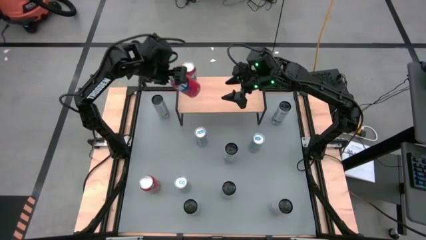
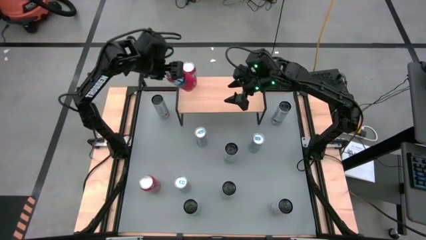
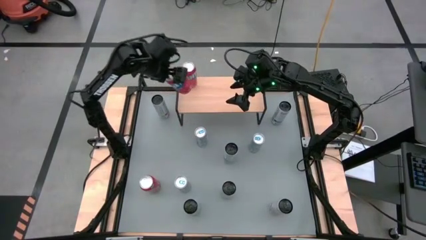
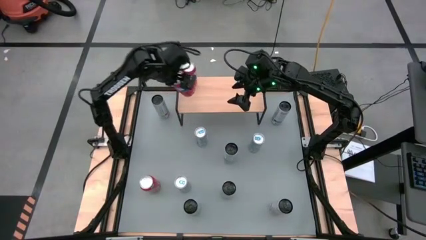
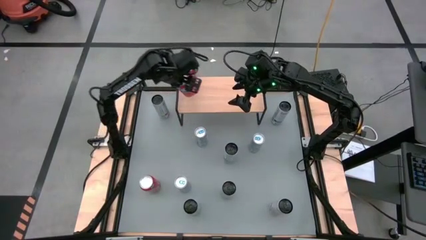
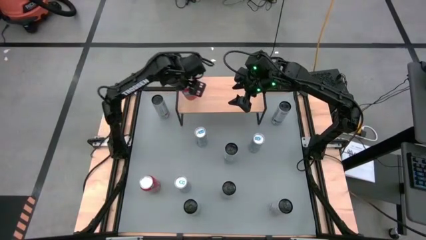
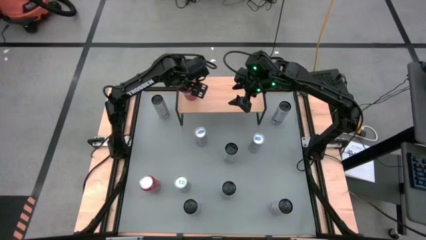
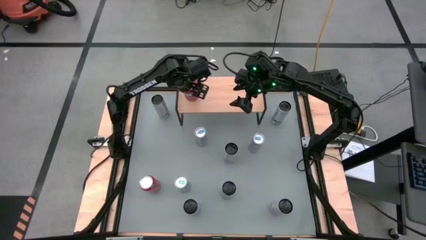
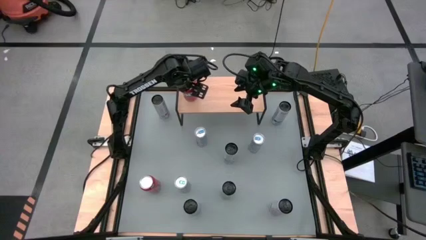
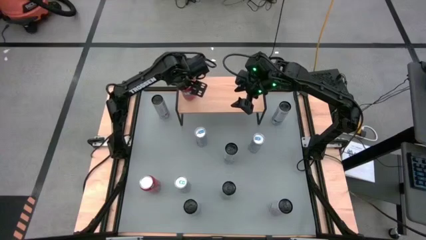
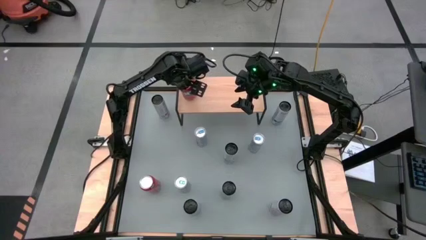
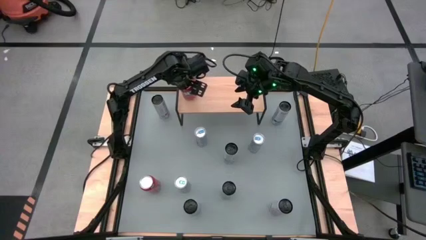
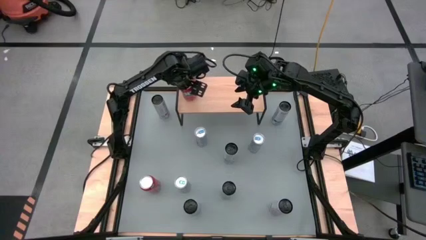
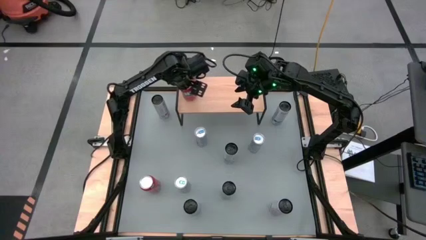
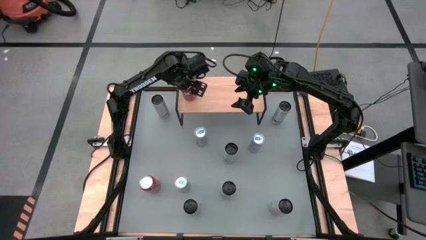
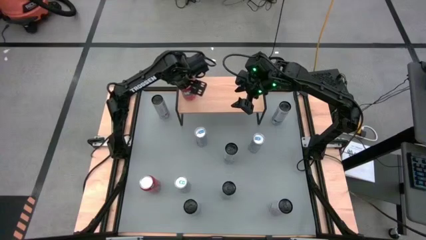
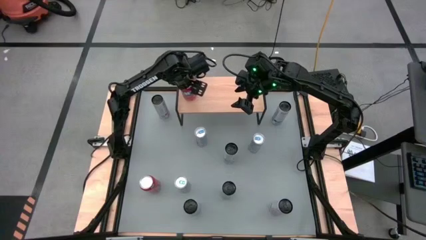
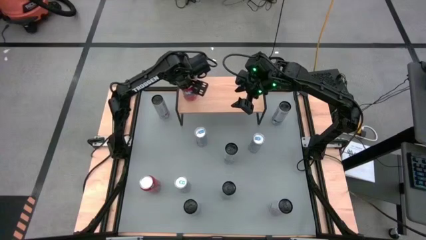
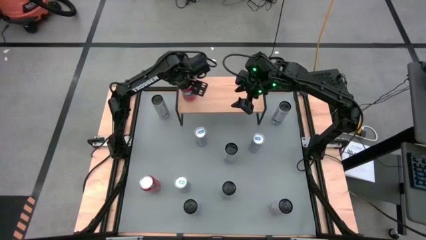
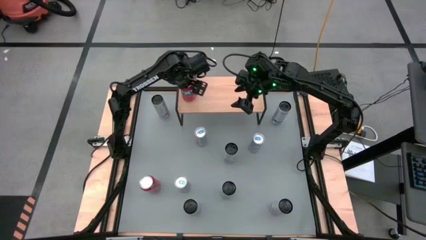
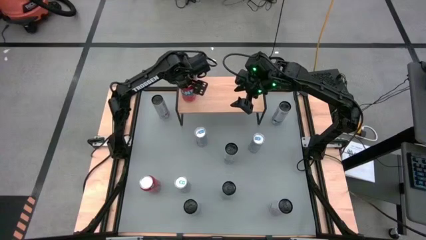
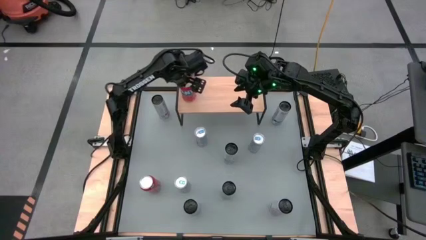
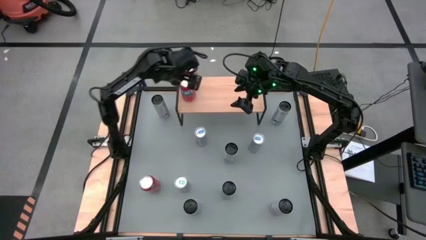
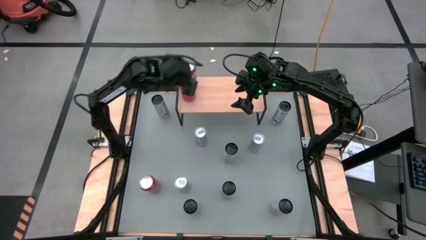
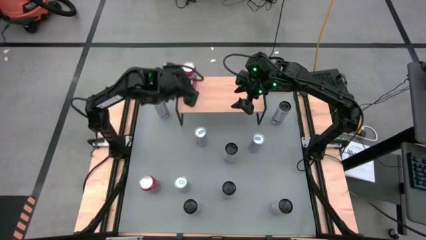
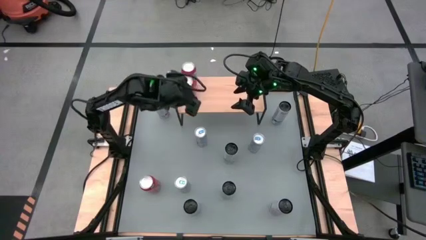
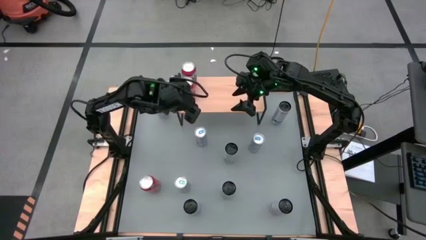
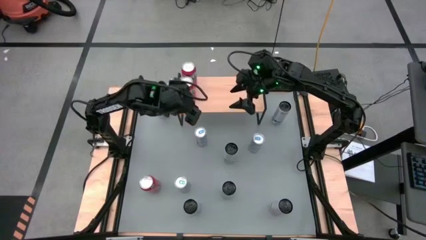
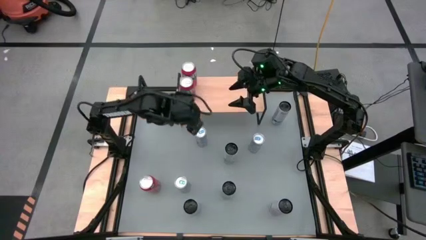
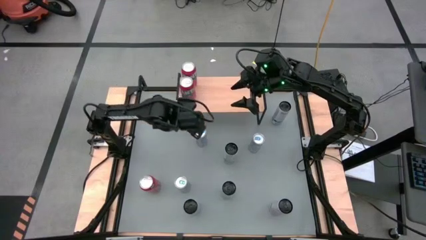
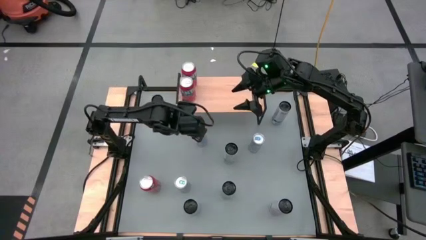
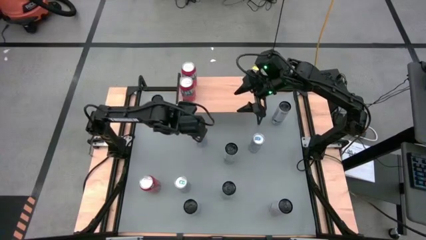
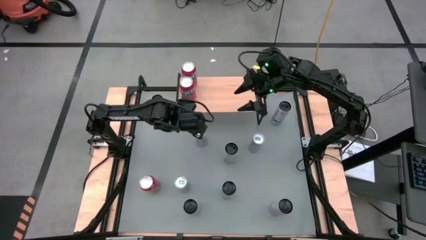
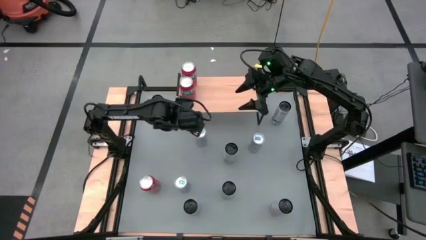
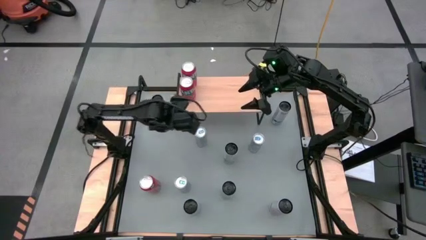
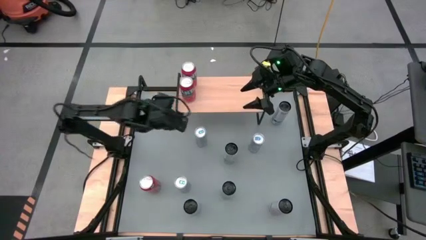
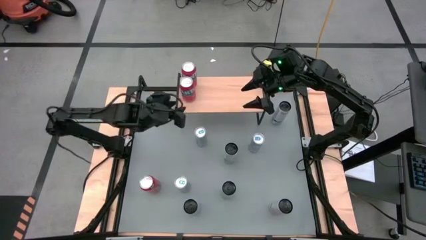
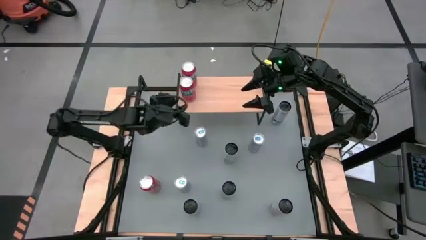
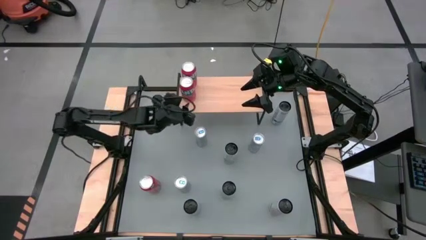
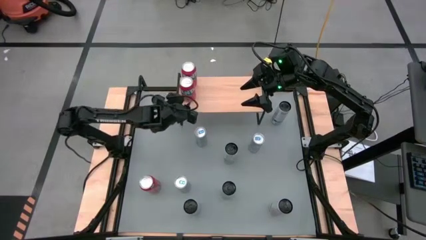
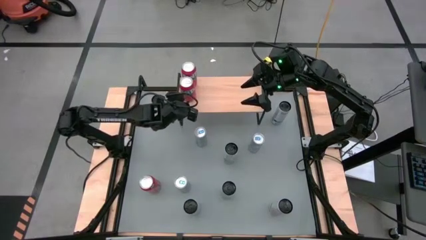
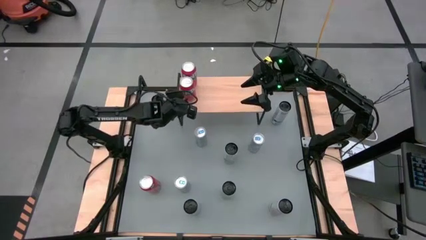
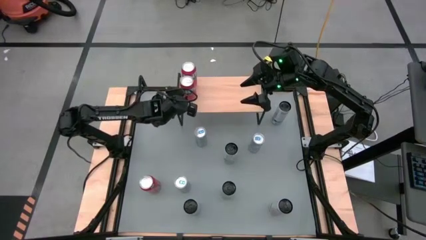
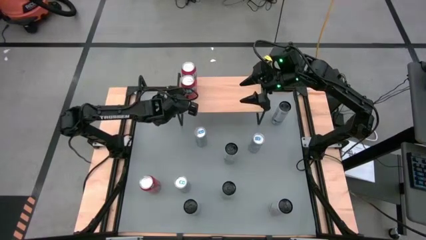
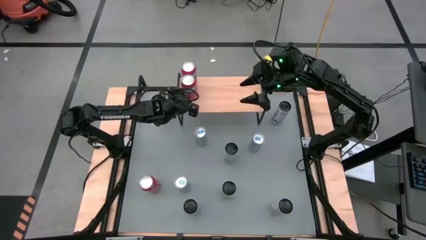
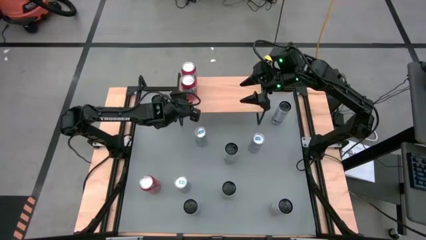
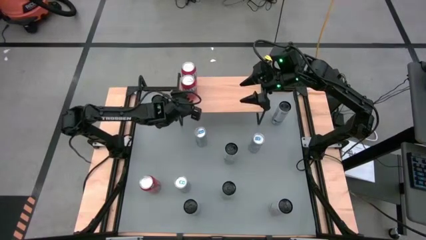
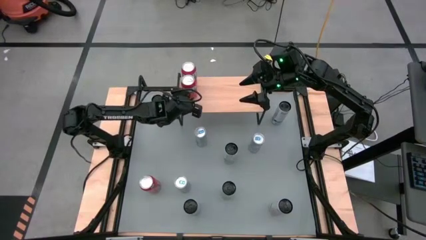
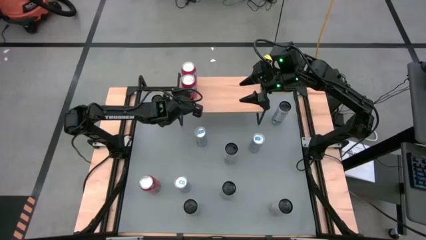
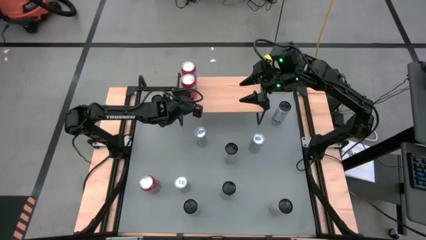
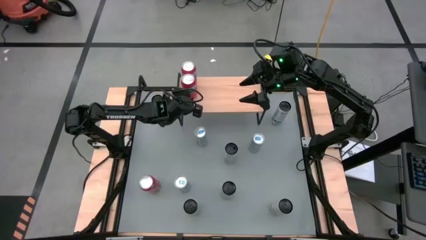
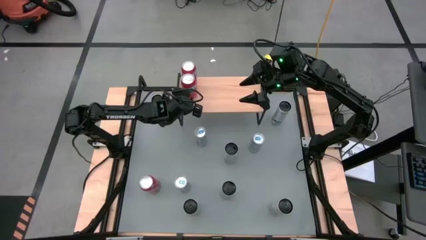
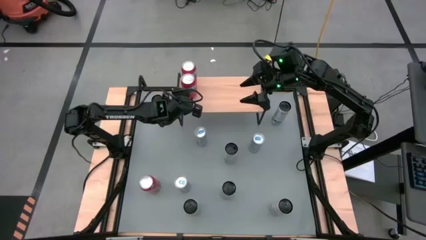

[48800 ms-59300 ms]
Task: Place canned beverage on shelf
Put the top red soda can on the shelf aligned with the other red soda can

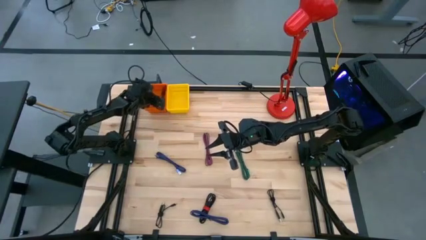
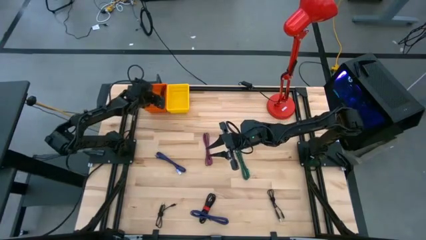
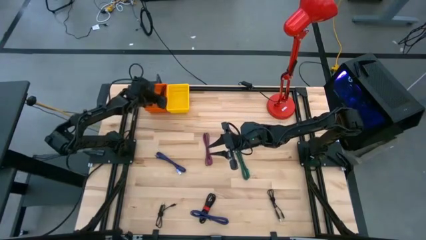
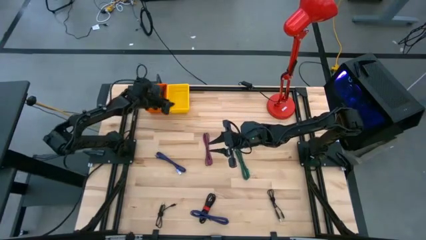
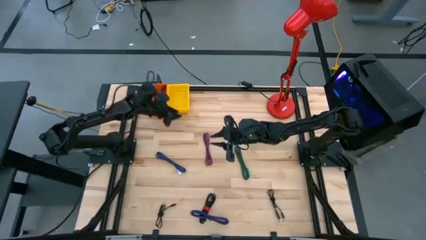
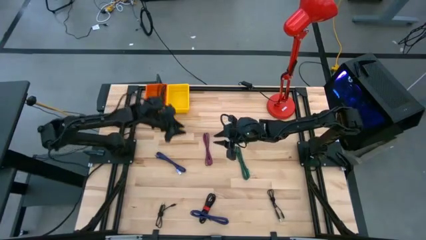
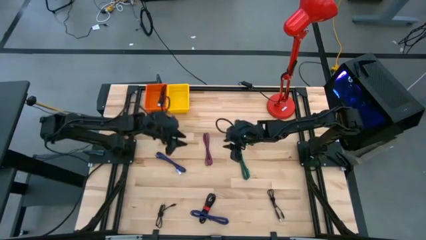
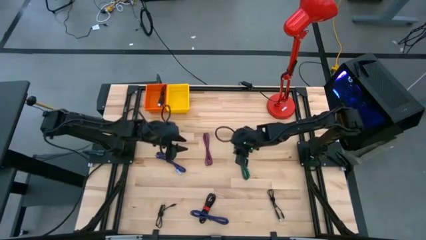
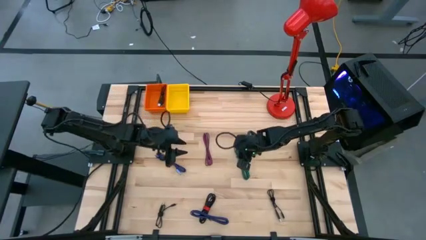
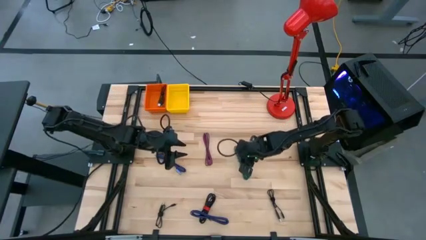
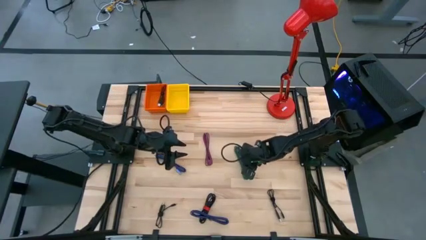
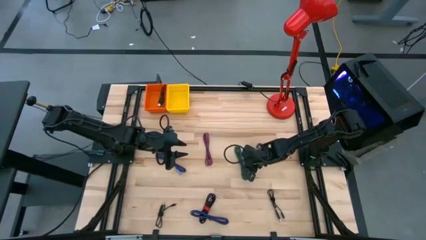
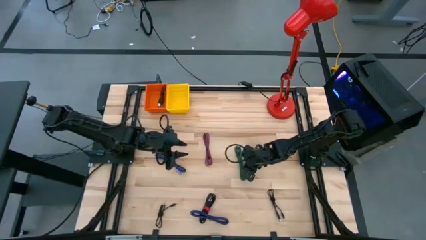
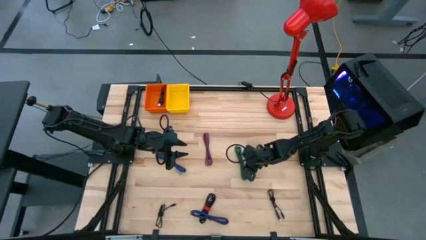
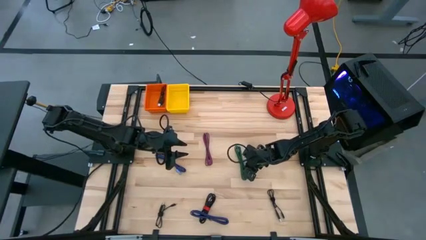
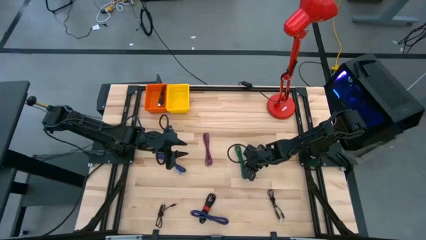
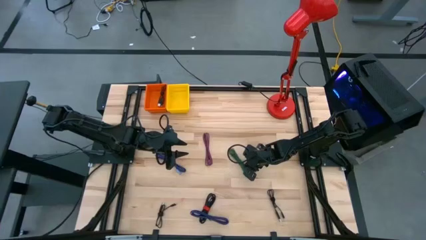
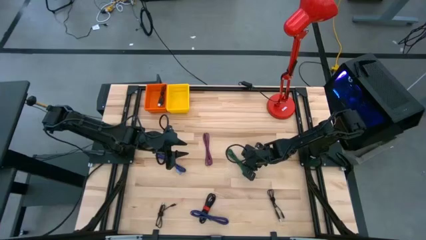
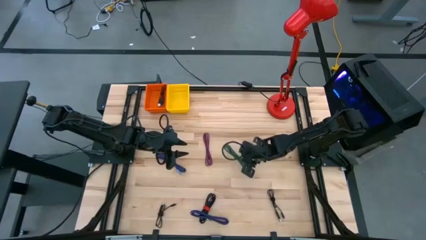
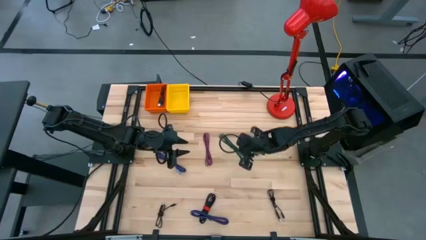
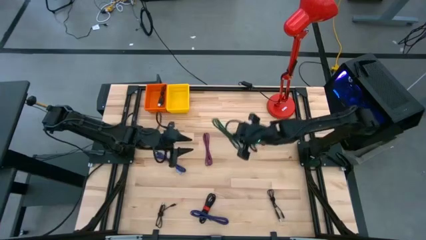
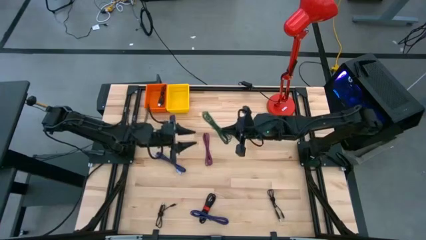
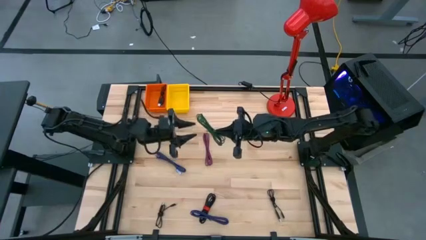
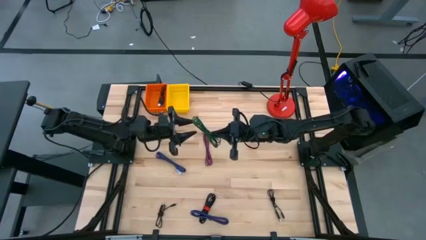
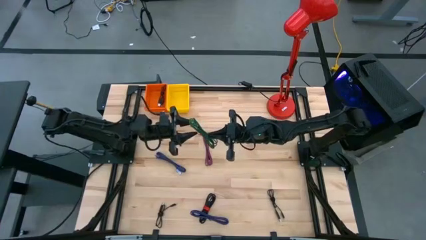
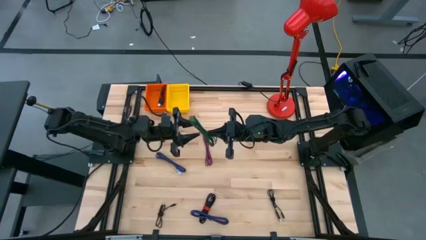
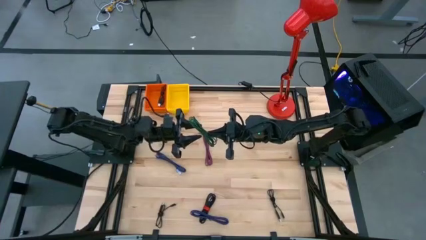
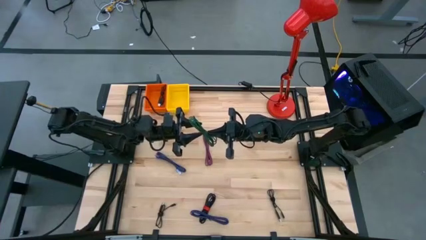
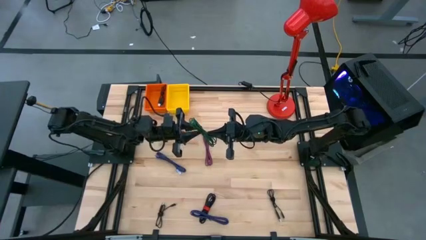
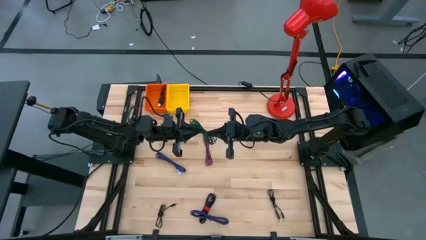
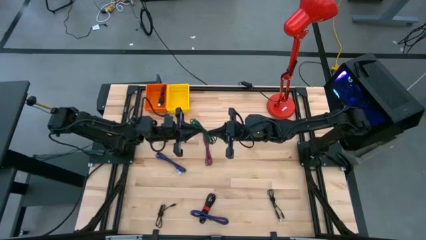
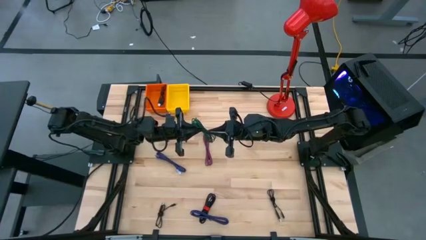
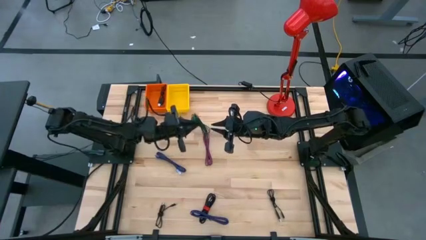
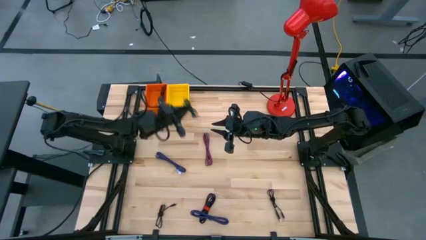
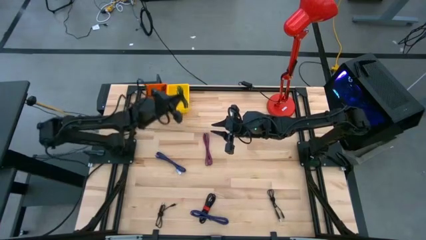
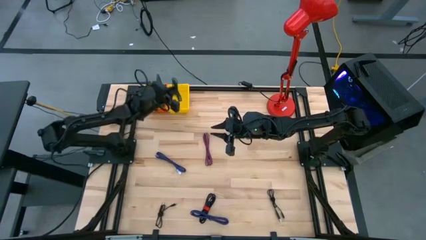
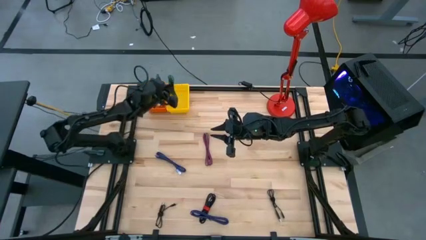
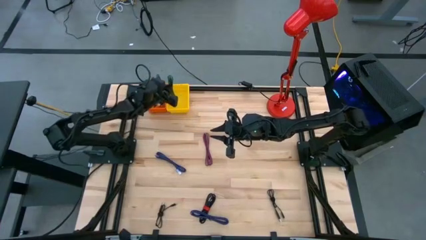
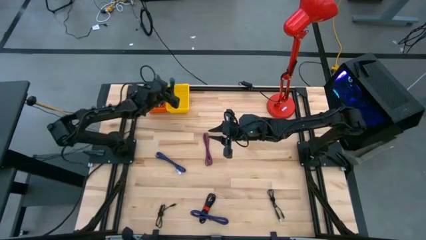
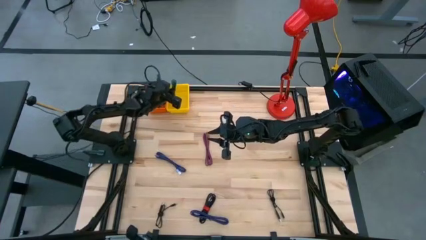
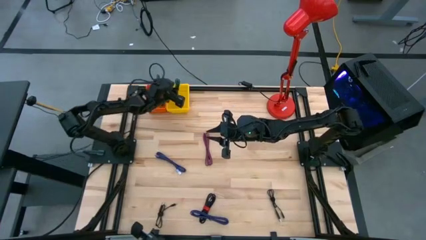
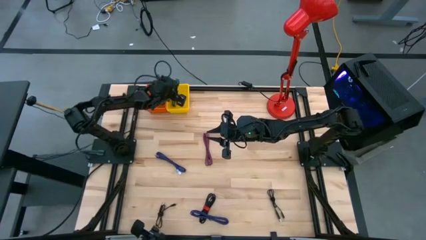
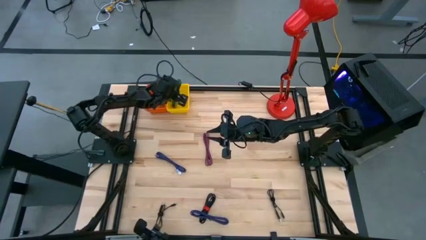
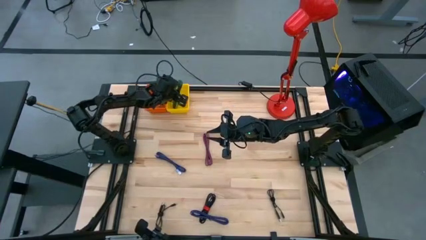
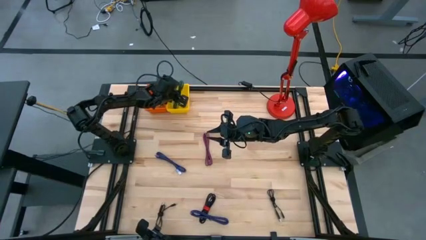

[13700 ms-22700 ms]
Task: Pick & Place USB Port
Put the black and green USB cable into the yellow bin
